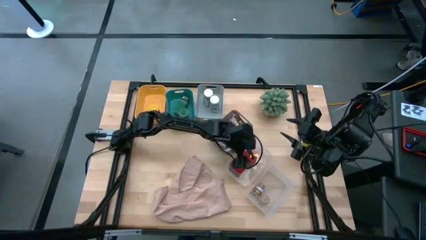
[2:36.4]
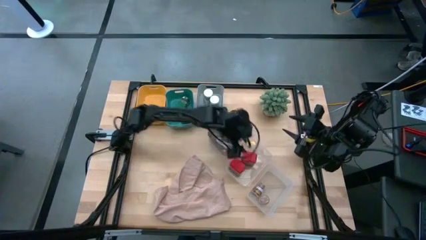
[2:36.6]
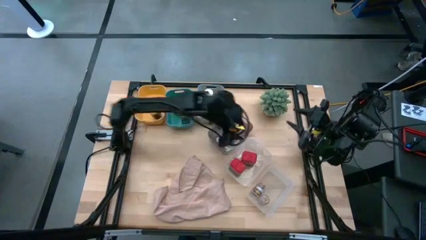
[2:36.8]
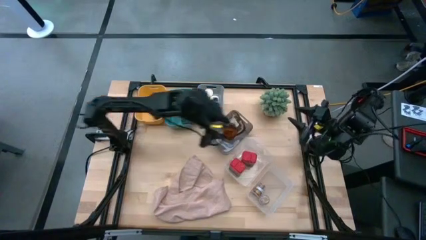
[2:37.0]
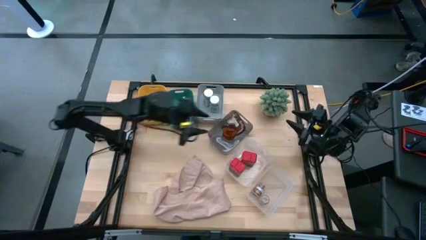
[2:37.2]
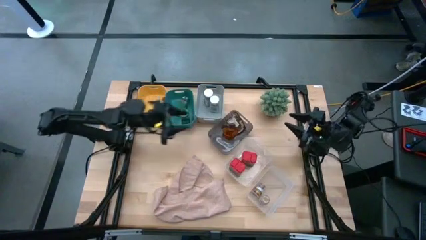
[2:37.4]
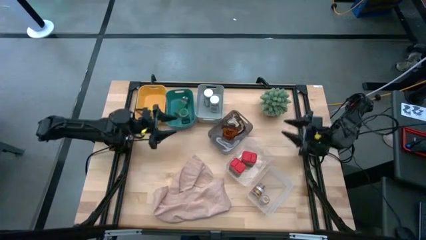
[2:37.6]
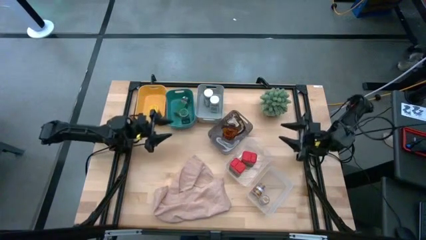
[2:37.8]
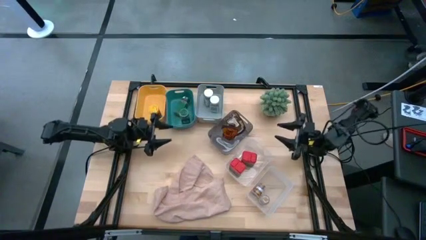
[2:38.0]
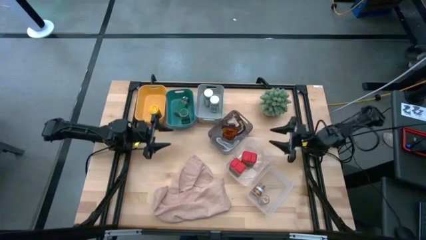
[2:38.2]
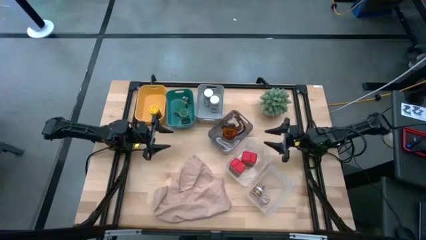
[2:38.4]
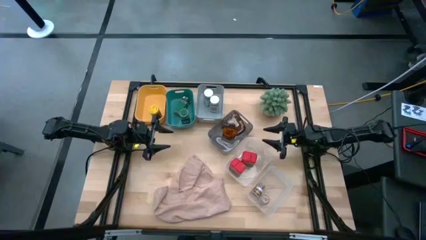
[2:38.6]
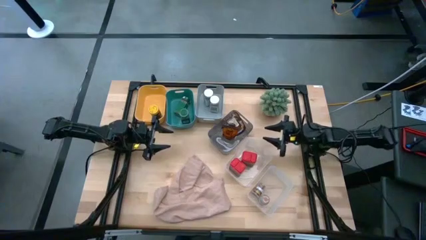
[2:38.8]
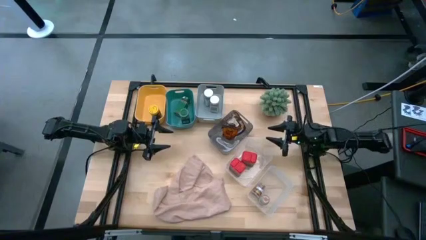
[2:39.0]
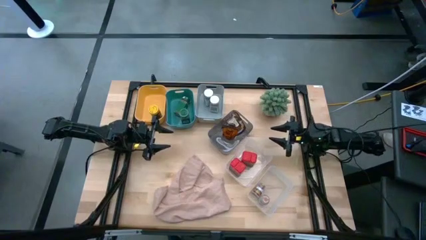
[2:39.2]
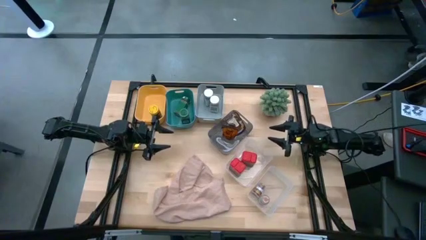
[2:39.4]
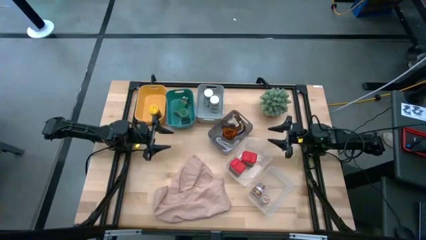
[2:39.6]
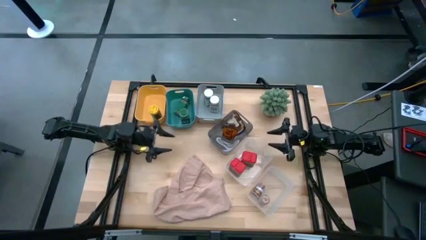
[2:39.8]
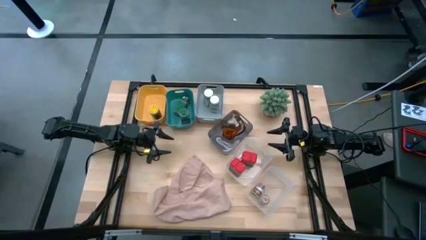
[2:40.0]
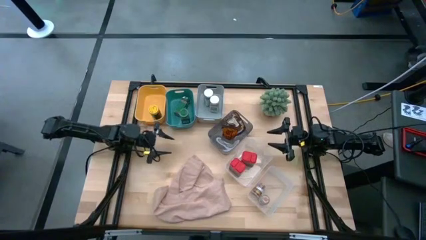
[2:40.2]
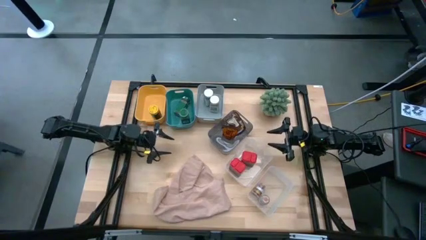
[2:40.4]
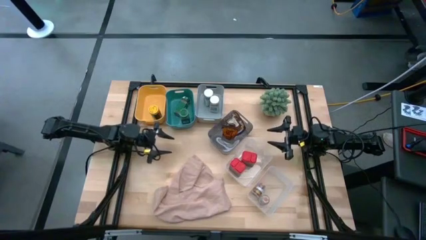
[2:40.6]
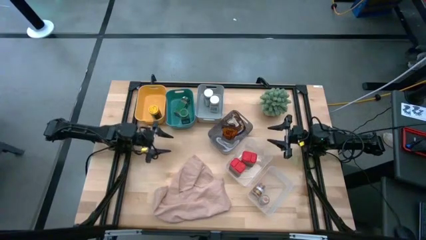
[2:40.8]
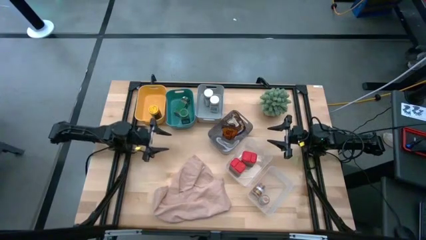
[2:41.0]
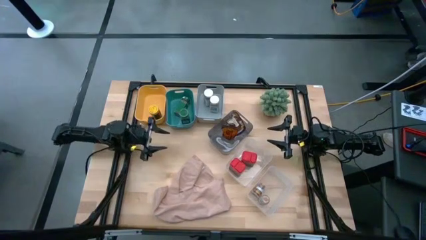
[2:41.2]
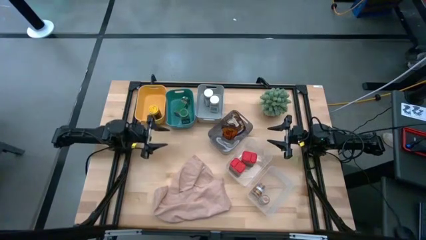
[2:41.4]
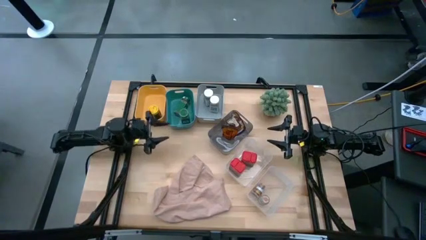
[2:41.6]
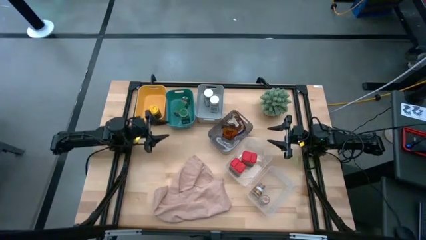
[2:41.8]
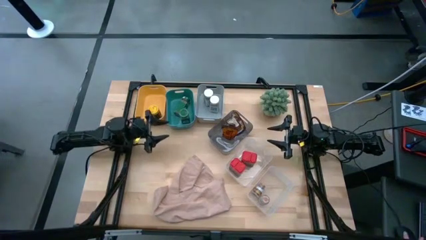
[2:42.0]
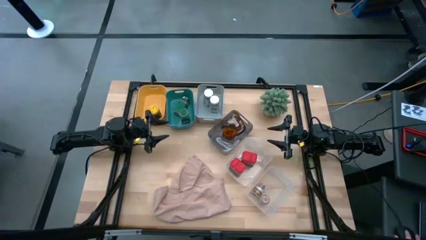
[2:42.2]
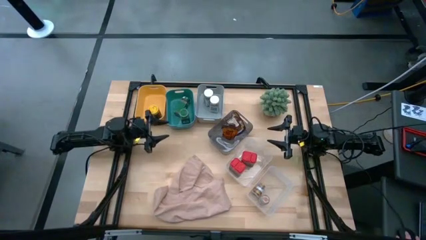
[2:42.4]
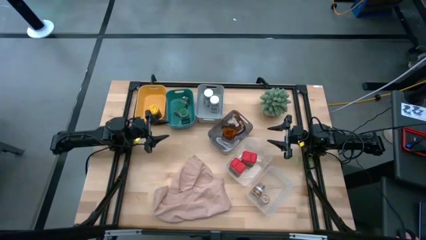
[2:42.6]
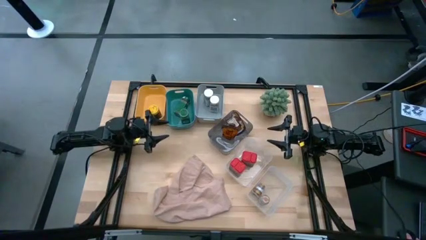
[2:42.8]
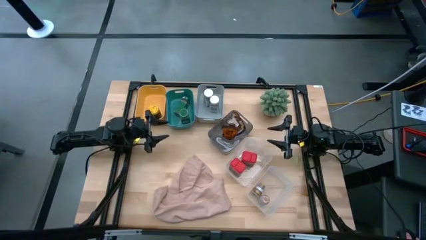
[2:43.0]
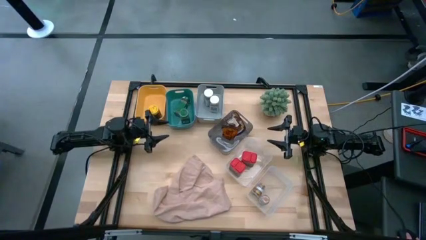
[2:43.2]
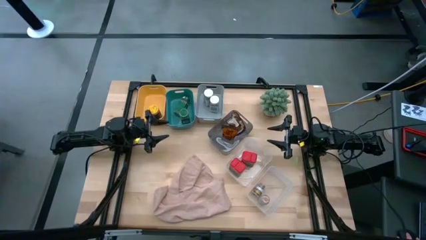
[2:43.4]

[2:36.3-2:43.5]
Task: Sort spices by type
Return to Home Position

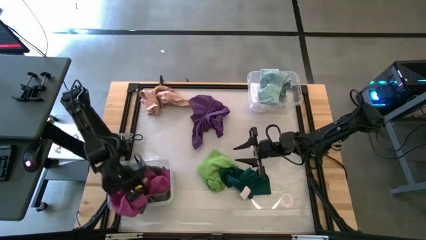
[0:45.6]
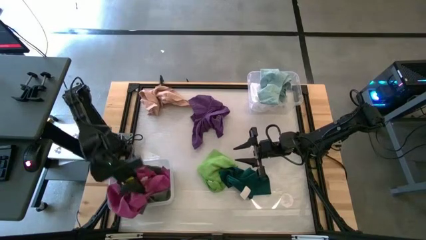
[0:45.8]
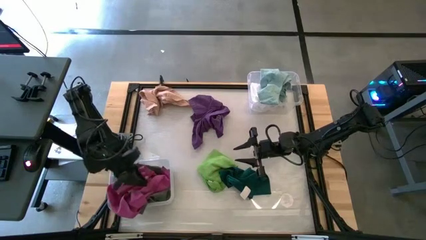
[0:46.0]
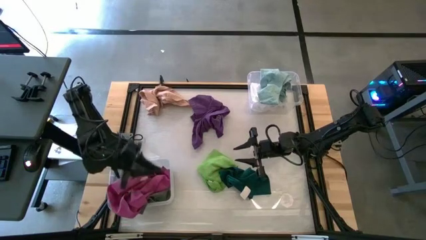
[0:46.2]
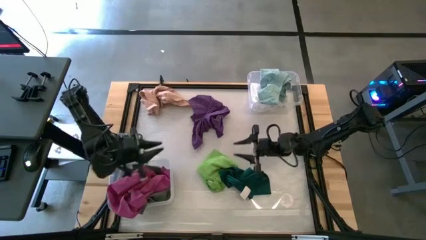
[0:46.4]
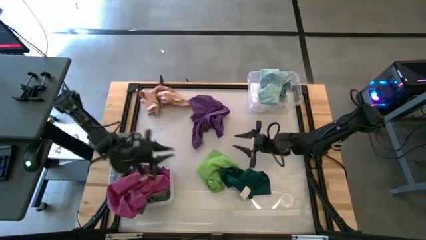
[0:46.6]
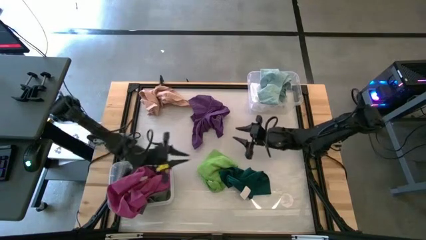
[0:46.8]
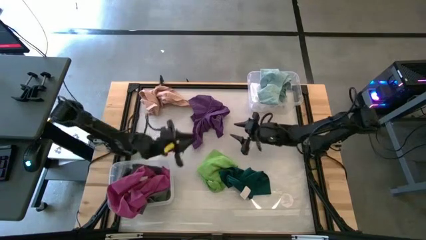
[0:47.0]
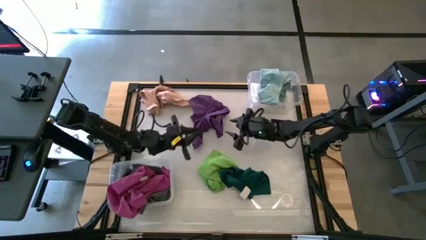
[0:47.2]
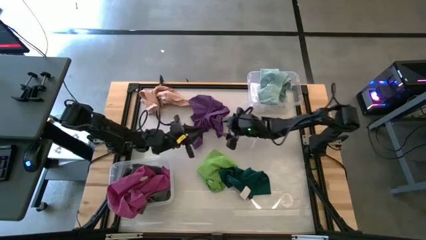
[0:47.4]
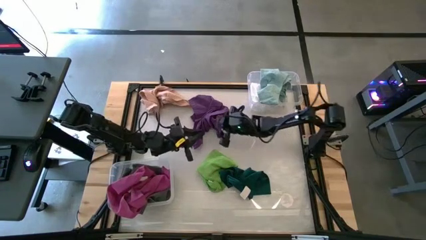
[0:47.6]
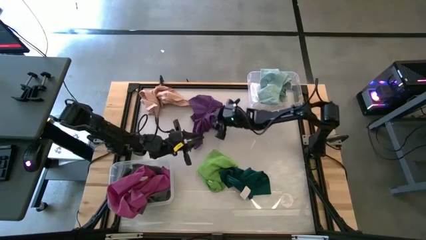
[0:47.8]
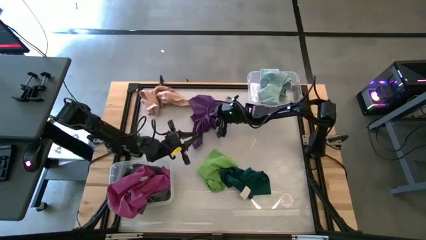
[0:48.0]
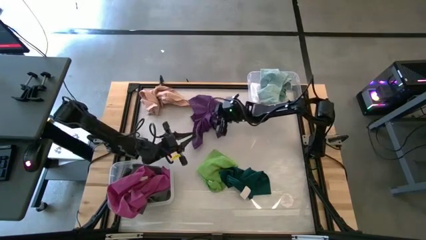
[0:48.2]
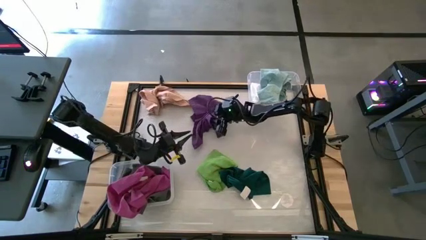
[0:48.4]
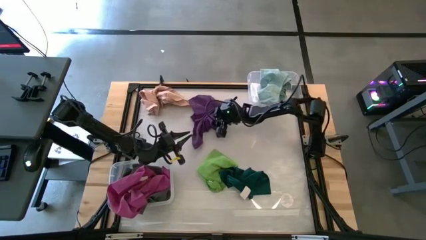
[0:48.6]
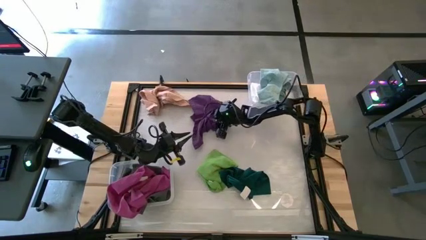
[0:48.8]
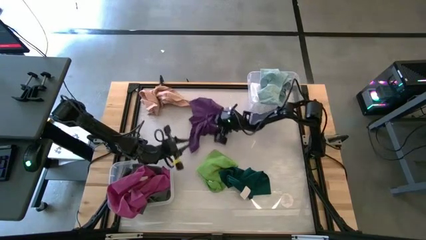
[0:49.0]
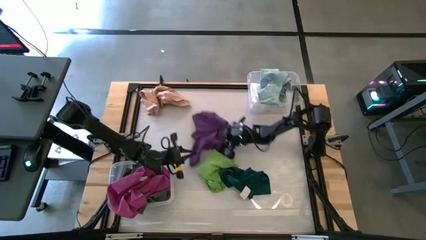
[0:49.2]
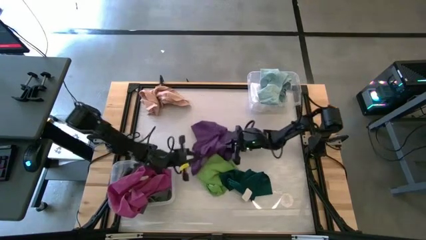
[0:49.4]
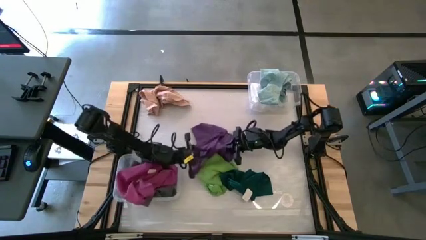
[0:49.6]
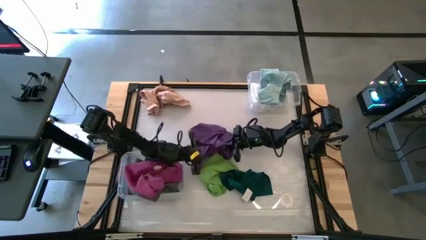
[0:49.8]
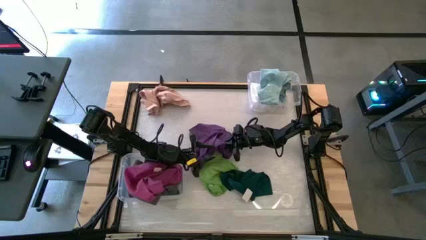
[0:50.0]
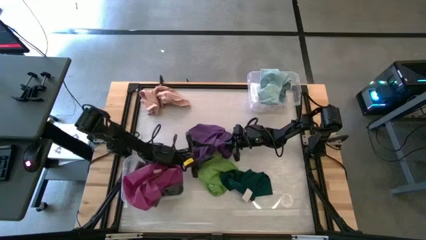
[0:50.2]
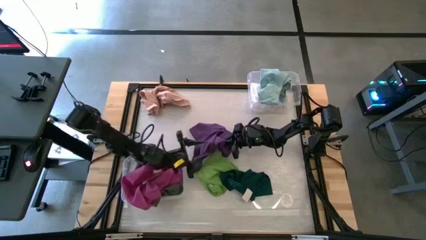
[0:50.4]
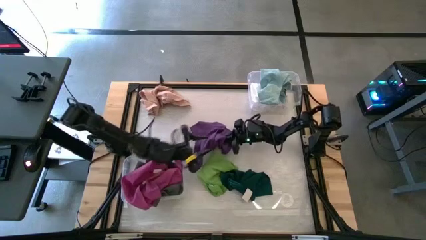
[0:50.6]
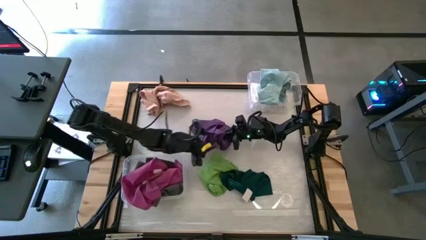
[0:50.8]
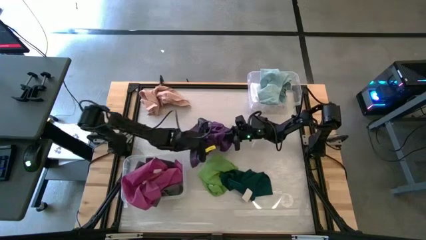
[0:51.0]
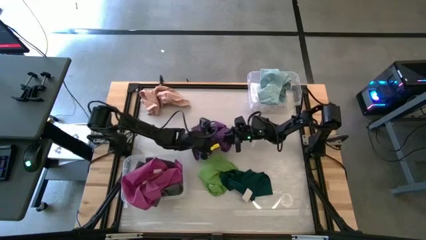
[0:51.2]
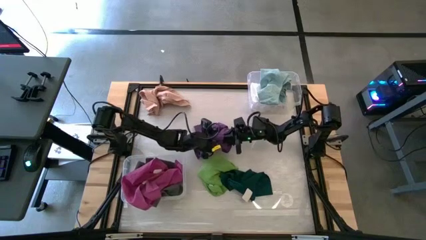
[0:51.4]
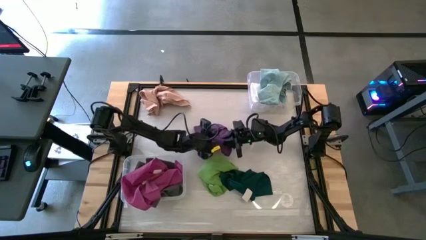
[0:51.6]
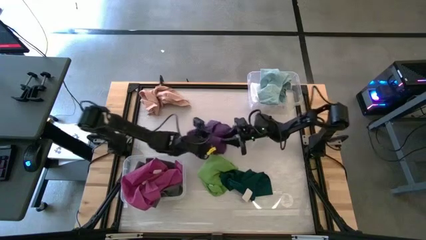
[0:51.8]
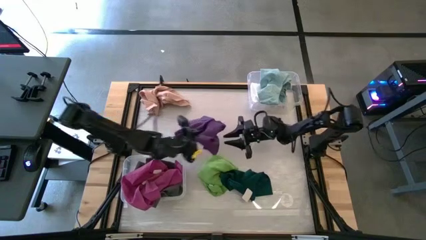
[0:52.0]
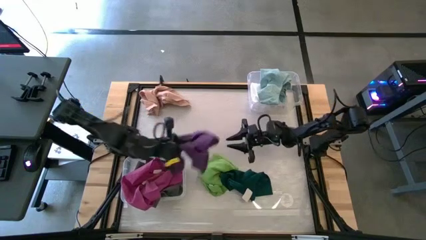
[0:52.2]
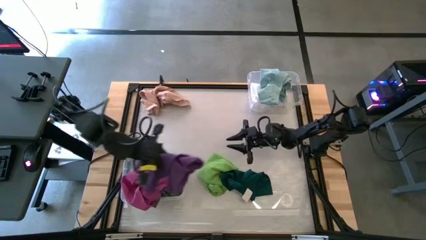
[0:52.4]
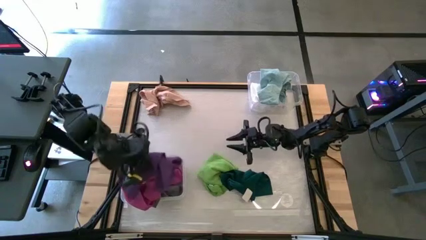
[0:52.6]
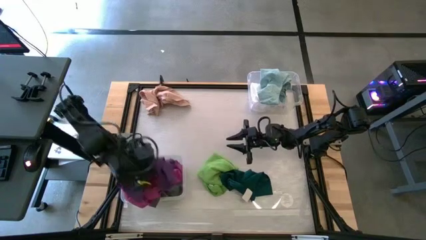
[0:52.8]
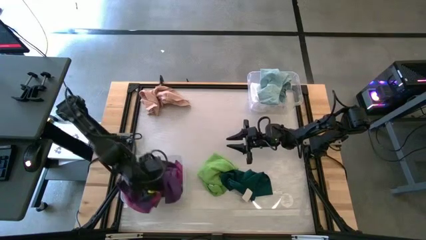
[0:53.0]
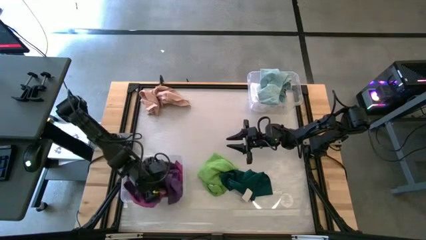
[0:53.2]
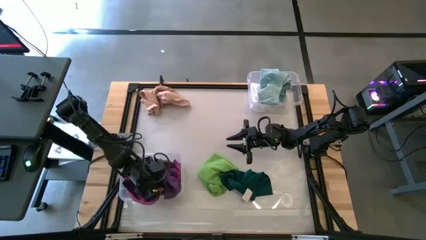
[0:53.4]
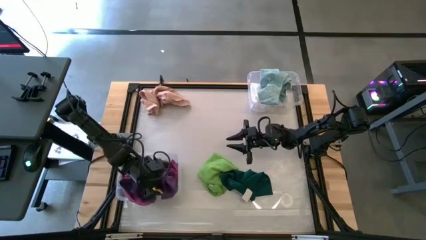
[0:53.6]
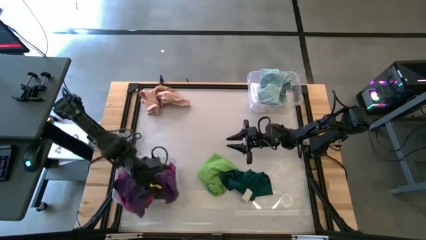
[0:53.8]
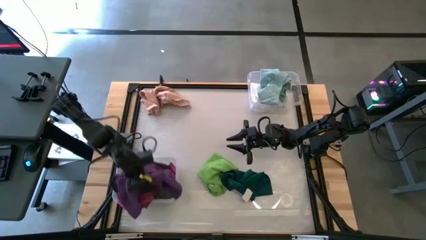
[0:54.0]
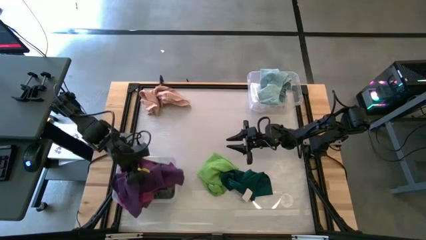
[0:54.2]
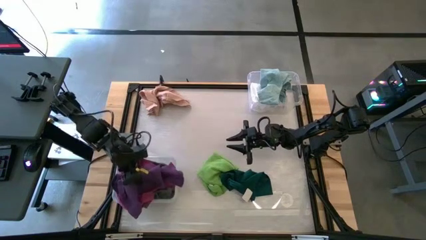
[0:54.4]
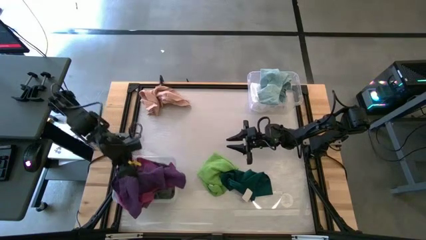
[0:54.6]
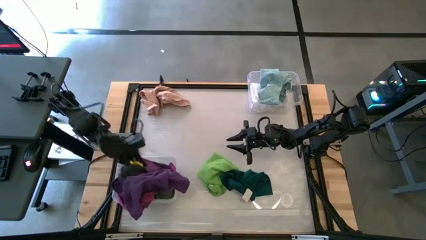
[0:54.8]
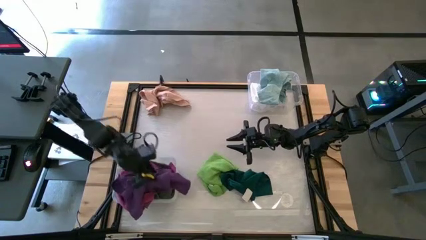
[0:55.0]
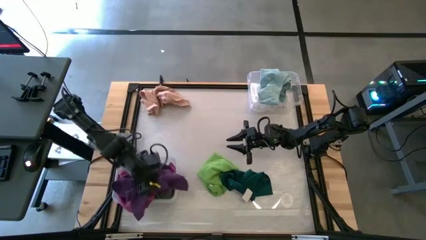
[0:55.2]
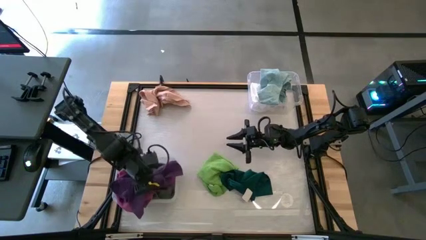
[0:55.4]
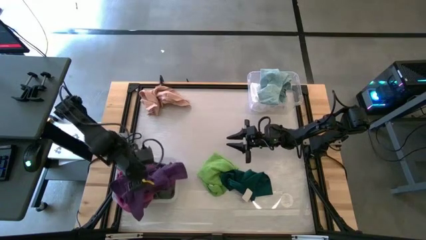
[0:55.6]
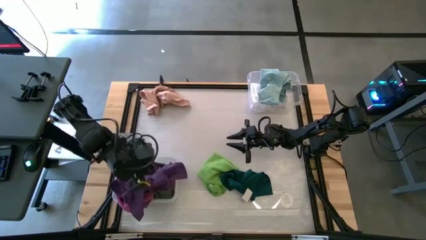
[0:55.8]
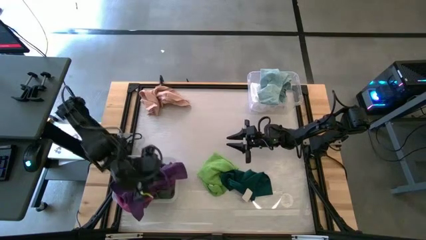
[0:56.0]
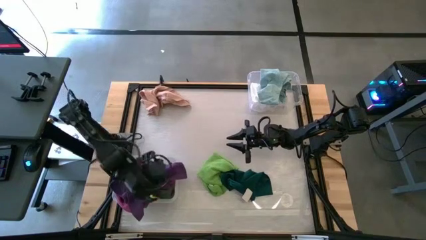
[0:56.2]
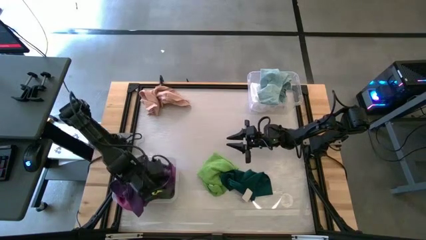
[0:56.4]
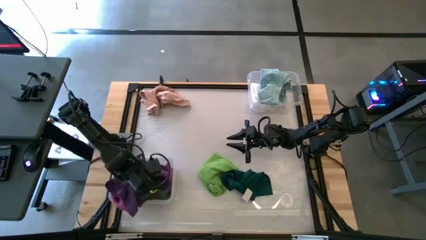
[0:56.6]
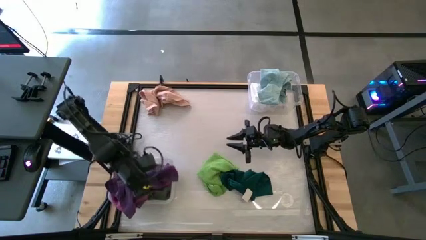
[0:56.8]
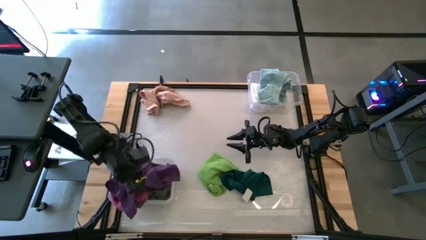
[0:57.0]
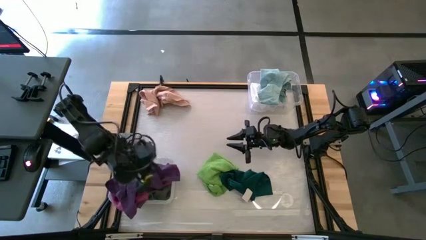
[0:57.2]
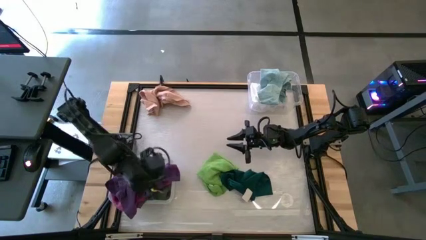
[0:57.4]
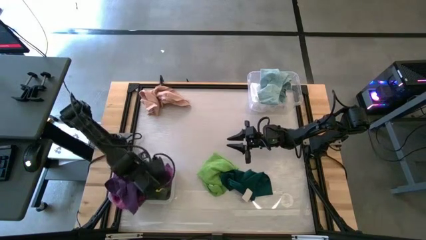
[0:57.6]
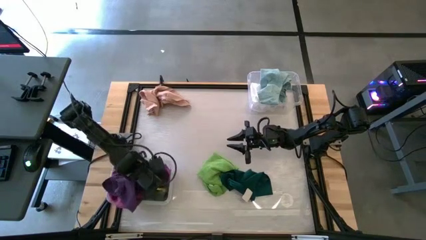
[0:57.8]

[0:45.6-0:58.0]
Task: Sort towels by color in basket
Put the violet towel into the bottom transparent bin
